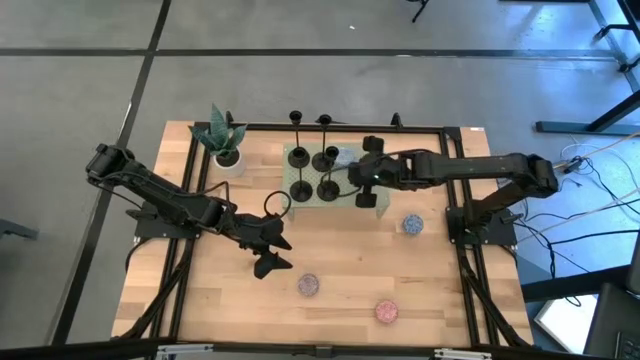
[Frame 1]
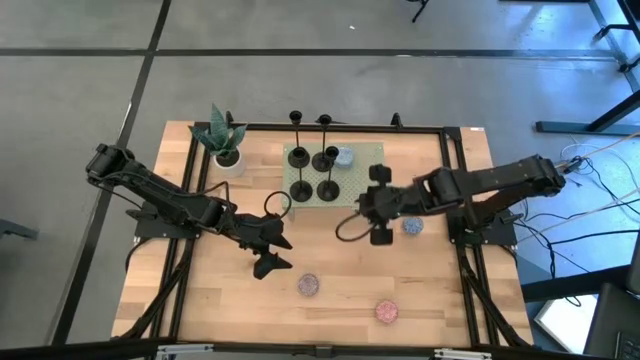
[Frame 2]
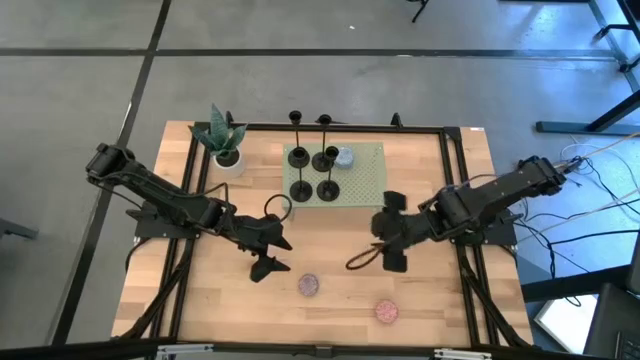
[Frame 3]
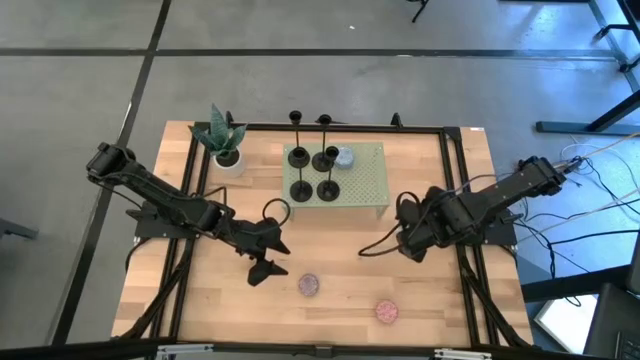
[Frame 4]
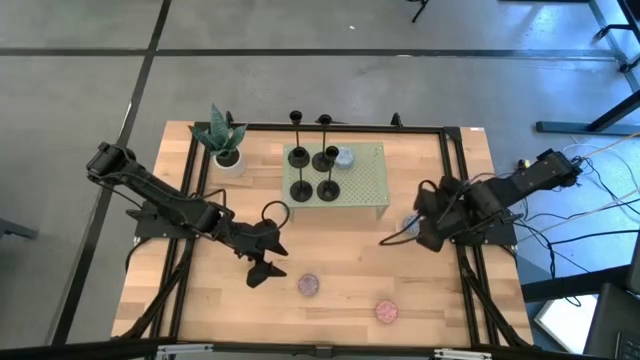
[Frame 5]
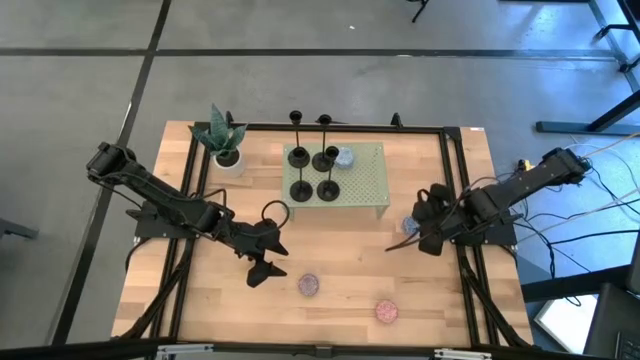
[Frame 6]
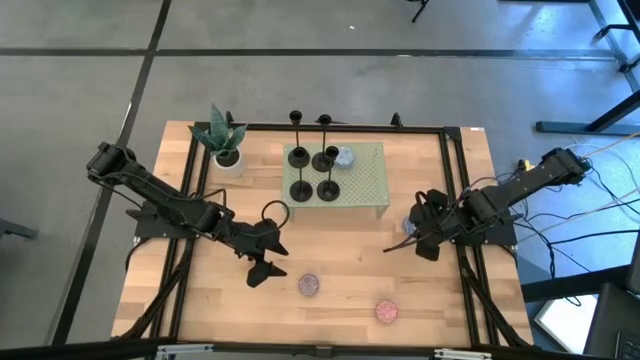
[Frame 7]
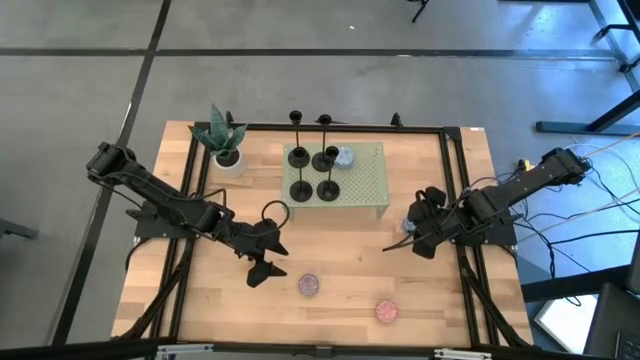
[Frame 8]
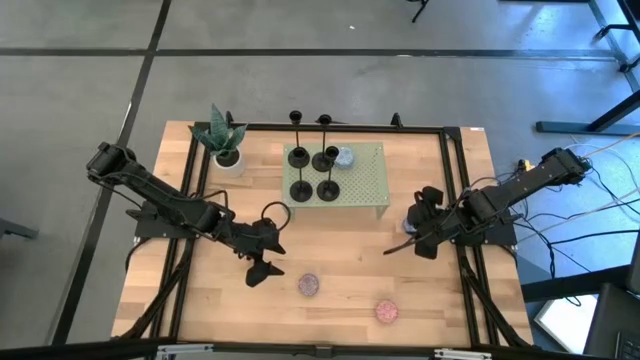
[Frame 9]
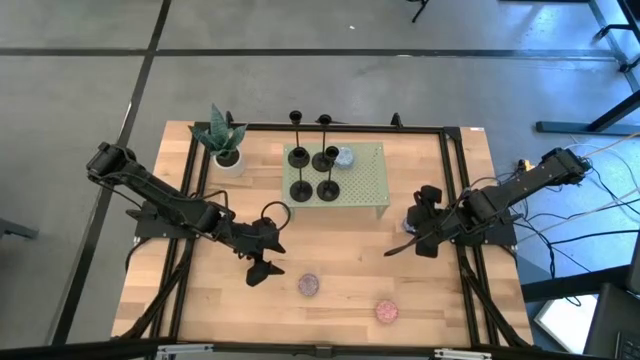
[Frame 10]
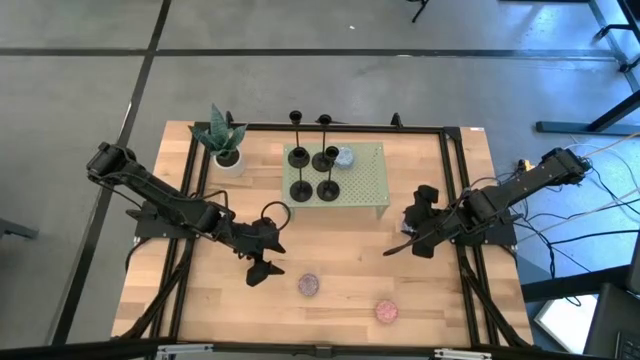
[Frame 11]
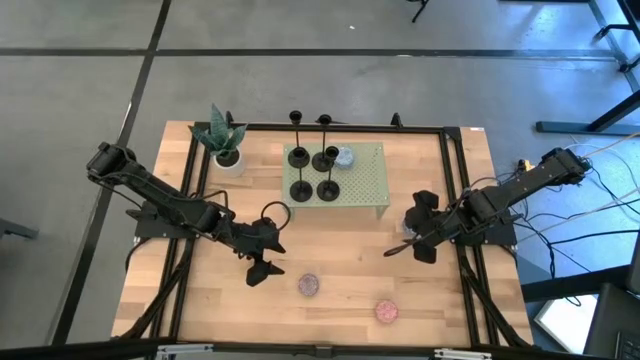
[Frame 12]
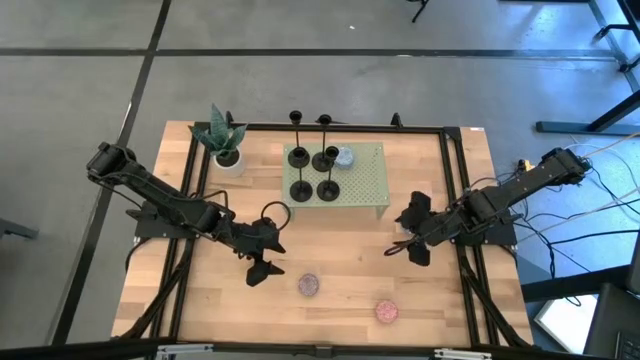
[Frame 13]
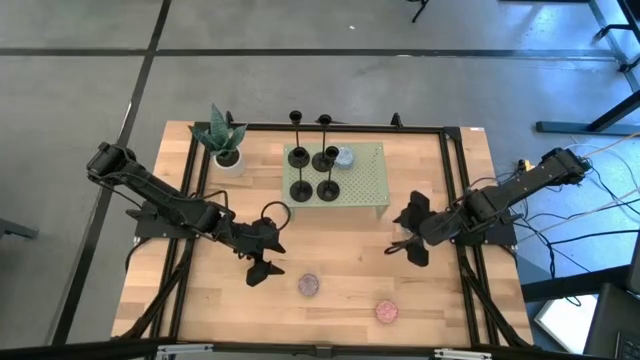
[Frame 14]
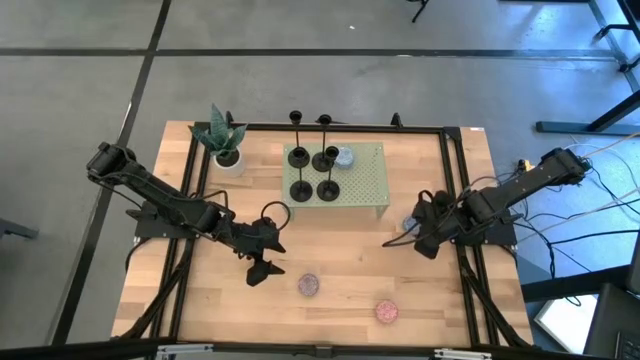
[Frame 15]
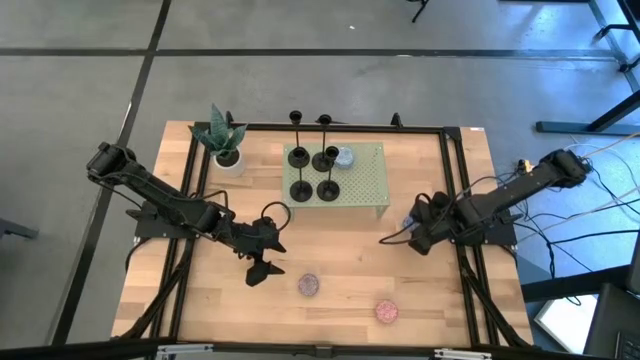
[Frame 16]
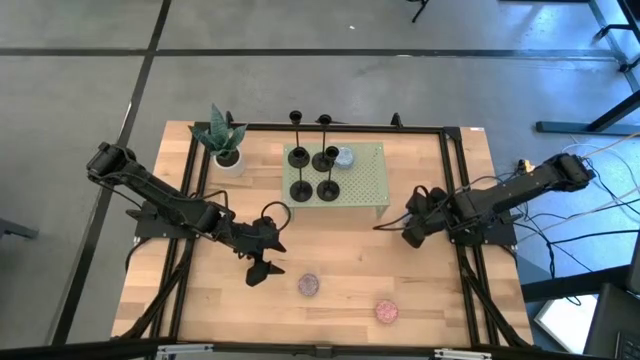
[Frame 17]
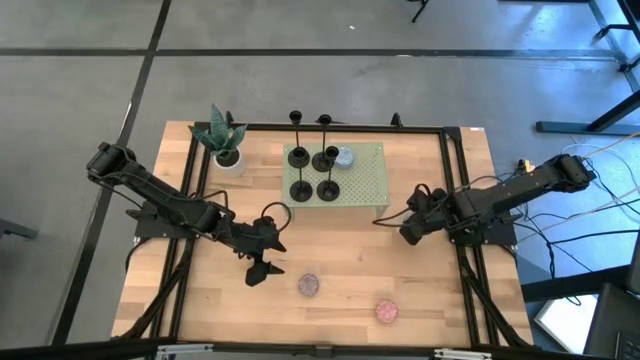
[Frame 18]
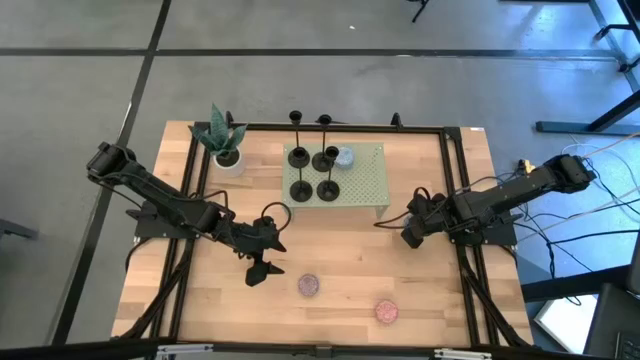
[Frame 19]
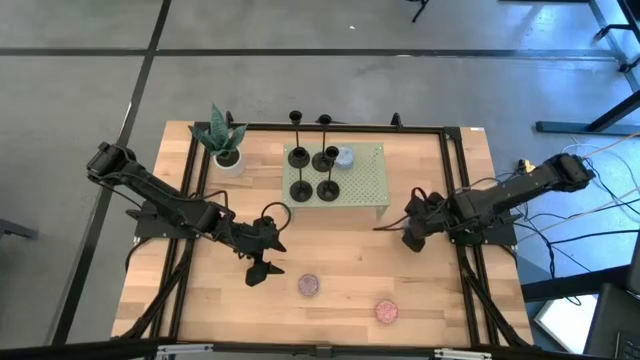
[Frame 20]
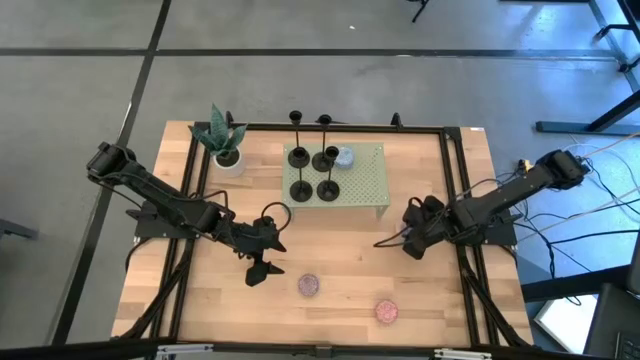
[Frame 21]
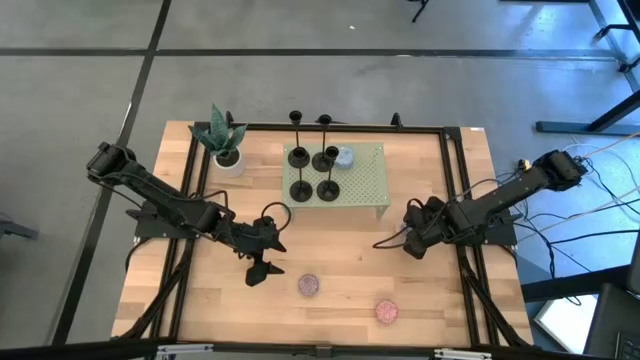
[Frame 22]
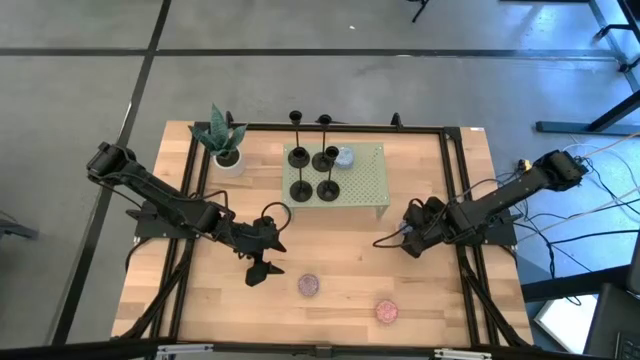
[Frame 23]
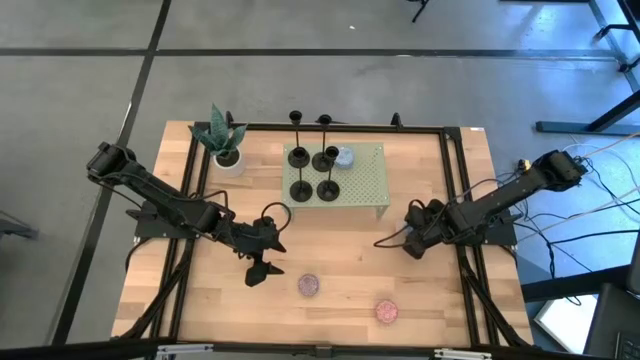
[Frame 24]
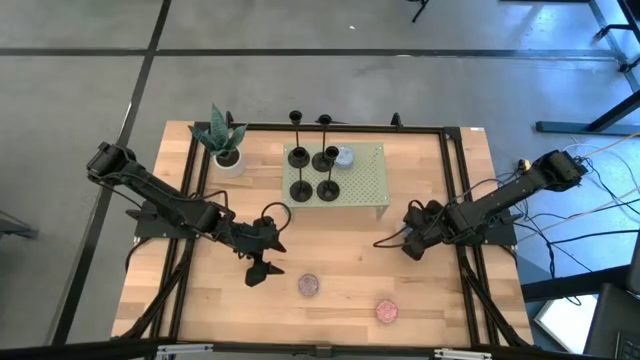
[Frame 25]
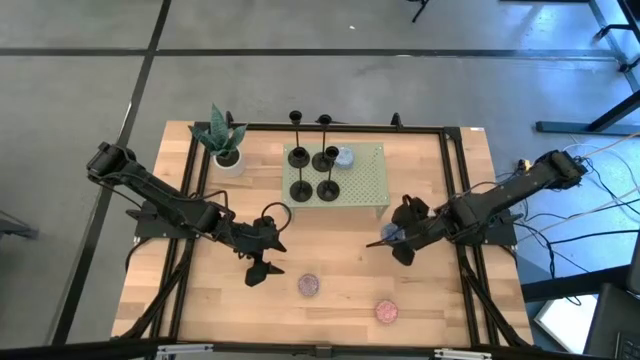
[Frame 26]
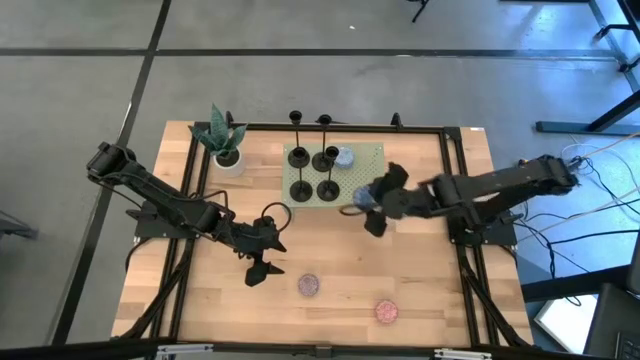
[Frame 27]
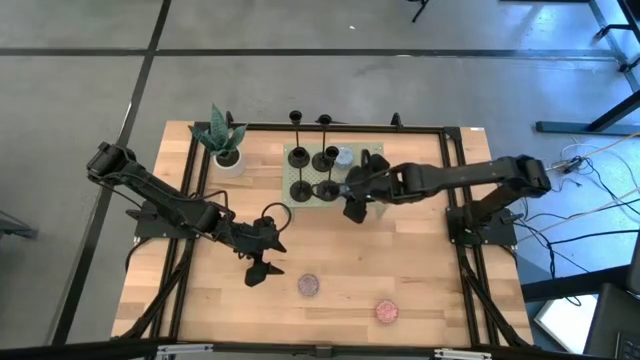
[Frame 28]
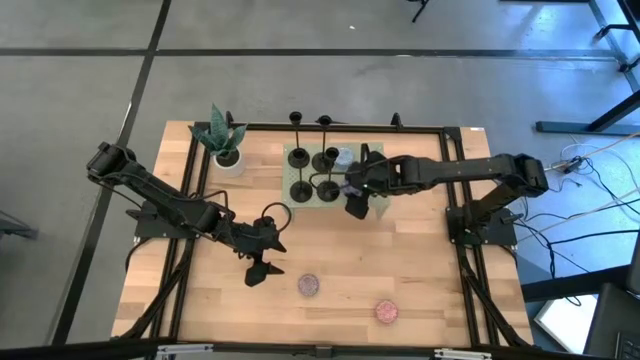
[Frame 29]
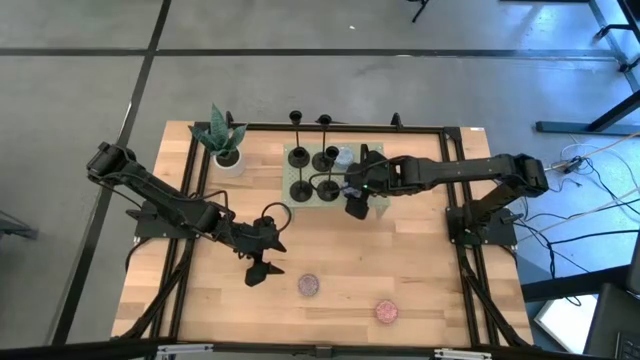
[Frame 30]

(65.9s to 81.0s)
Task: Pick & Place candle stick holders
Align the blue scented candle with the light blue scented candle on the shelf

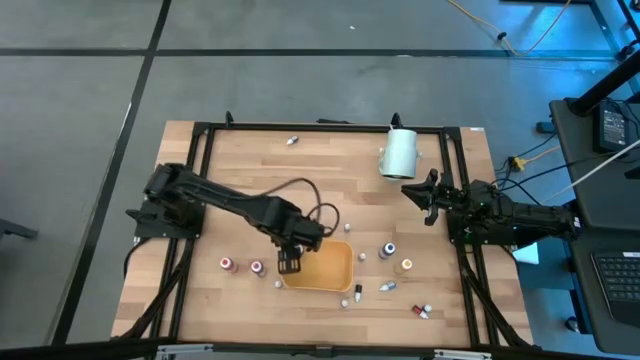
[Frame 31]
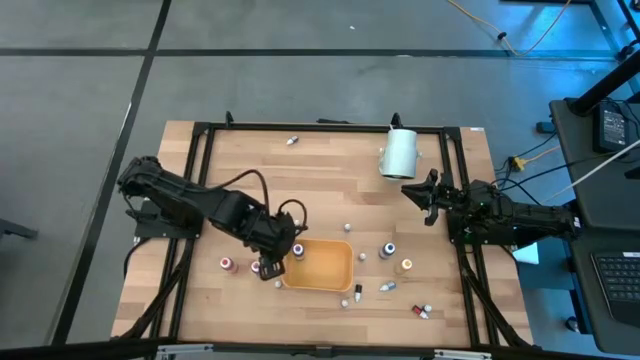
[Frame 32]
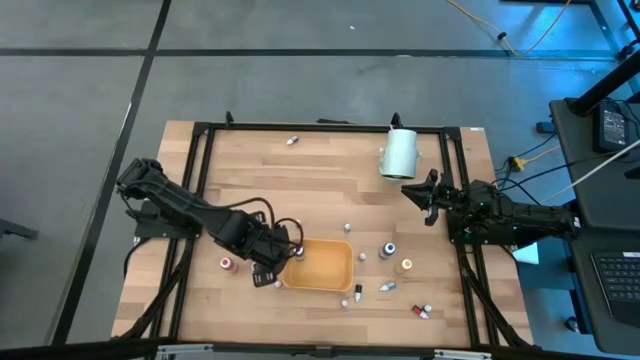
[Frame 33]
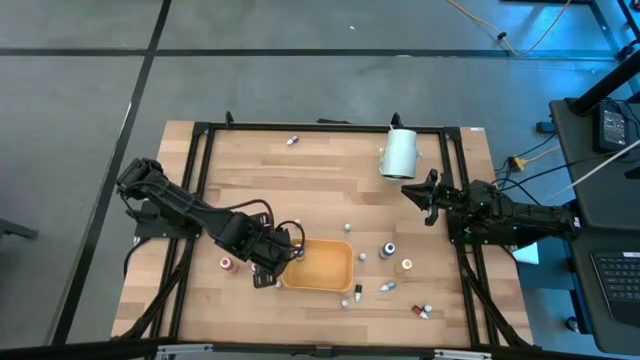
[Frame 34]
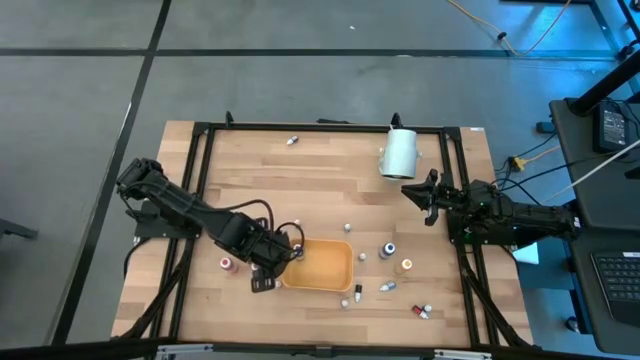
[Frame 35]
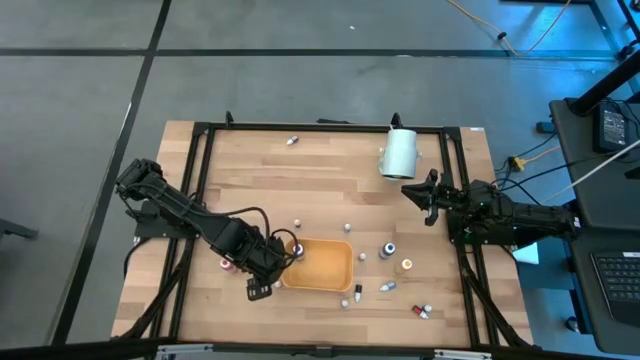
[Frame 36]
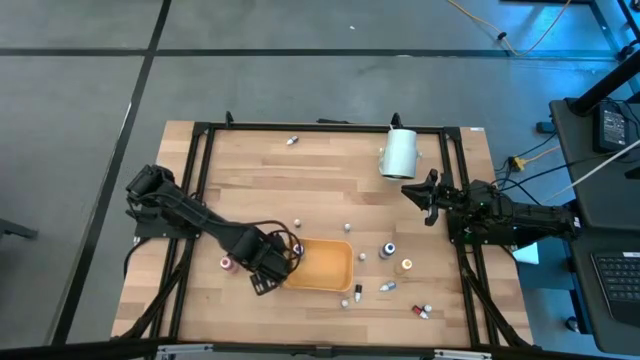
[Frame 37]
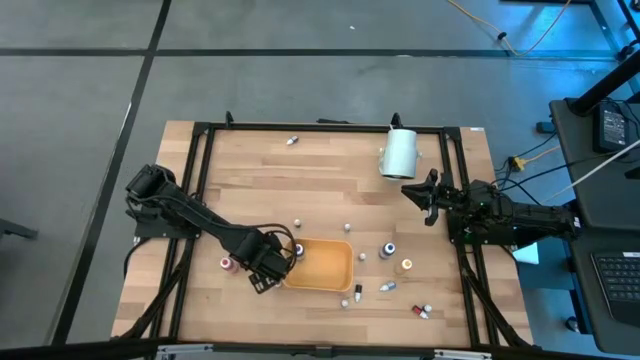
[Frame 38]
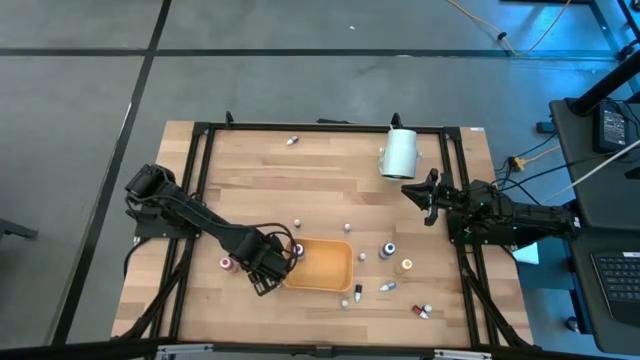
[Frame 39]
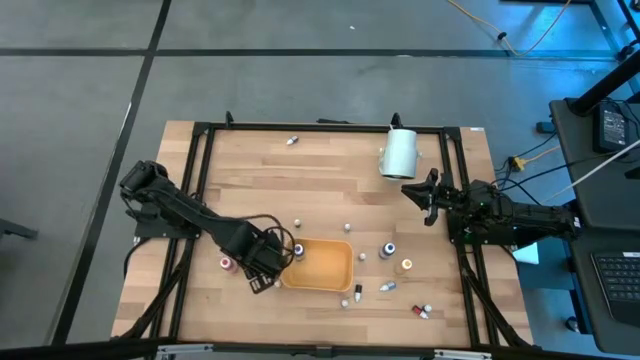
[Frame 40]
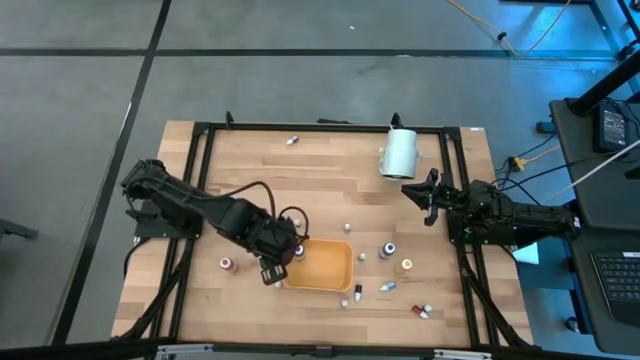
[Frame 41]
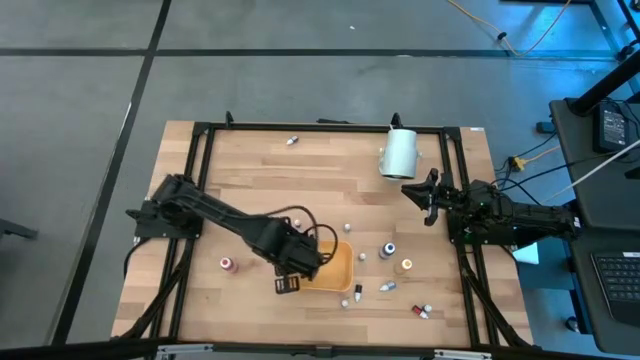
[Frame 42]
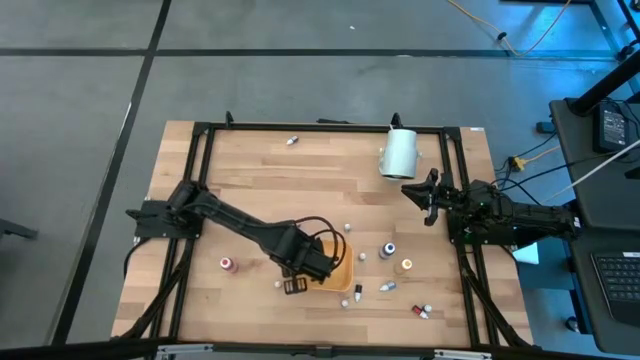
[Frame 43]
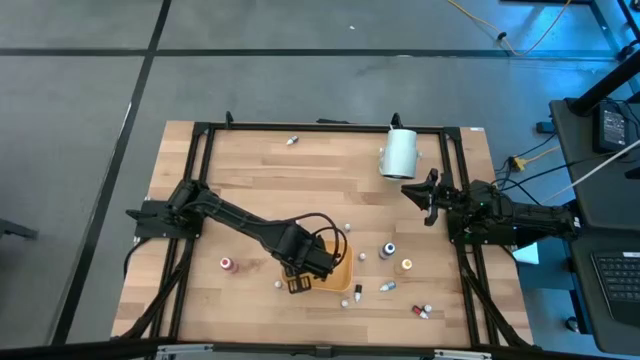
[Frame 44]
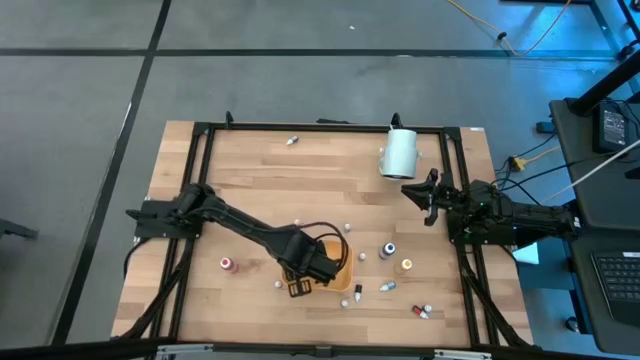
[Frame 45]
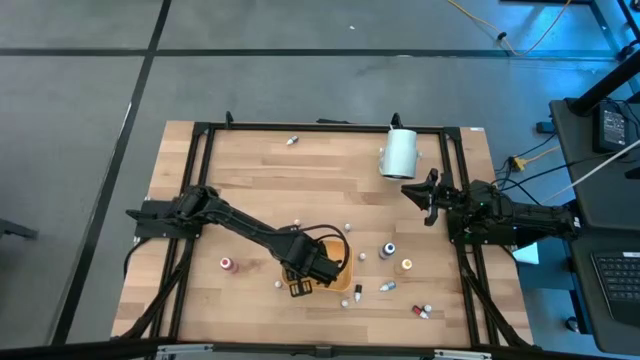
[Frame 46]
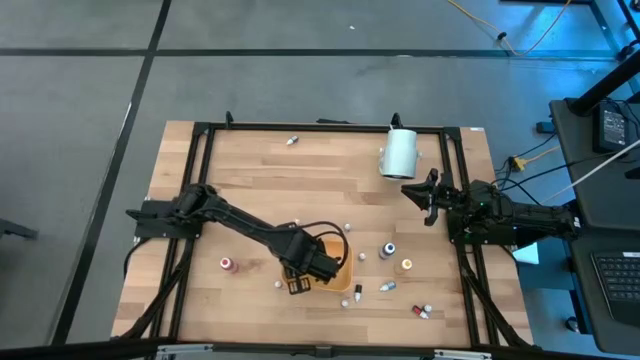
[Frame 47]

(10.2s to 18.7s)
Task: Pick & Place food coloring
Put the large pink food coloring bottle in the yellow bin
